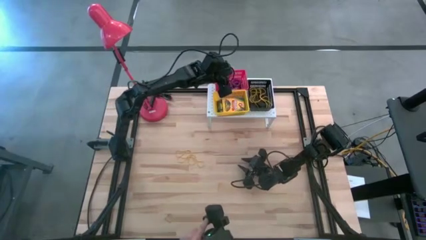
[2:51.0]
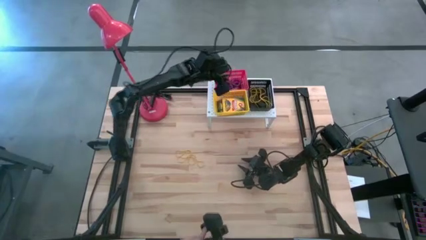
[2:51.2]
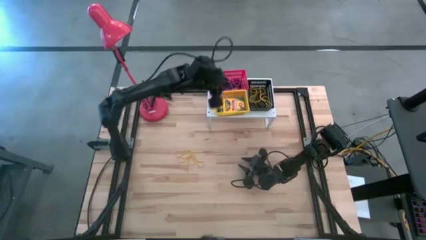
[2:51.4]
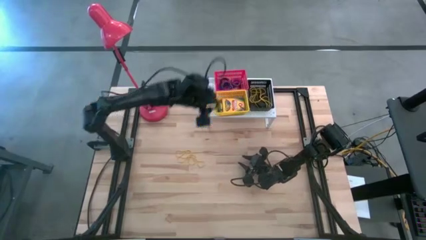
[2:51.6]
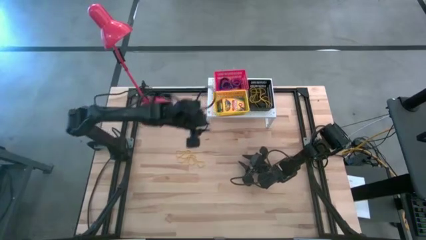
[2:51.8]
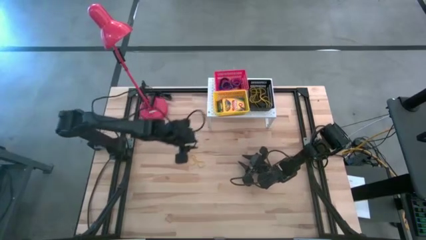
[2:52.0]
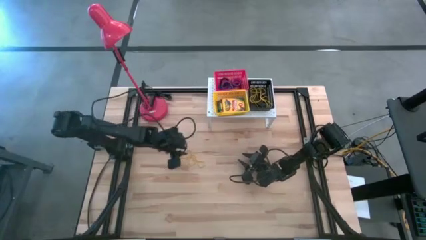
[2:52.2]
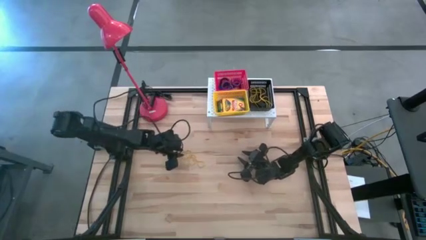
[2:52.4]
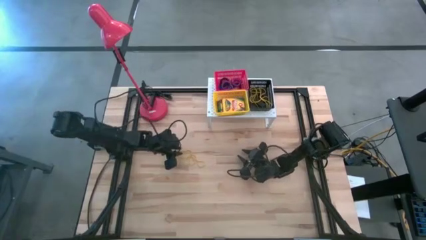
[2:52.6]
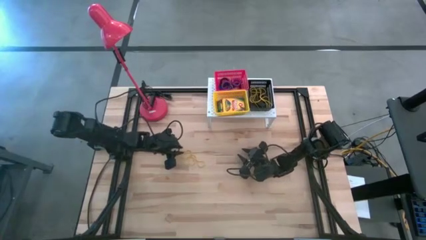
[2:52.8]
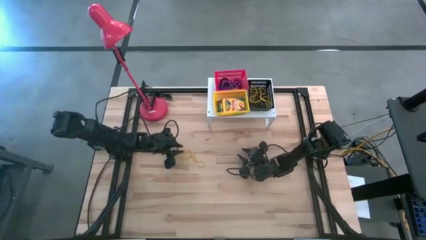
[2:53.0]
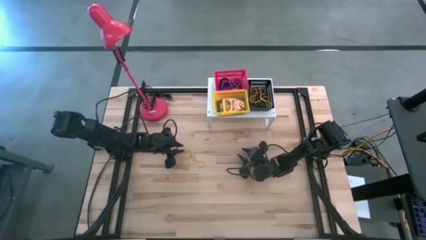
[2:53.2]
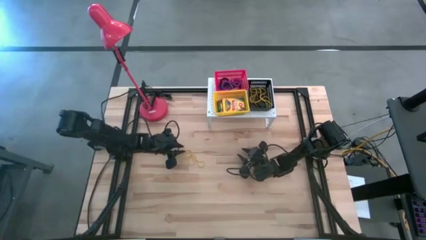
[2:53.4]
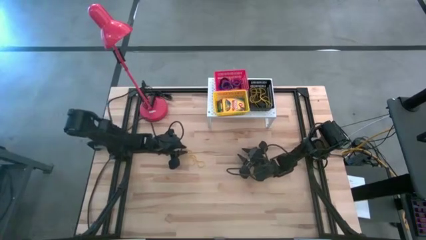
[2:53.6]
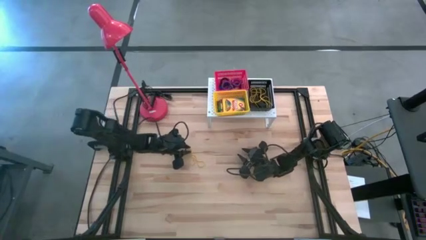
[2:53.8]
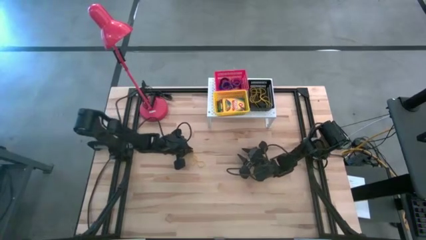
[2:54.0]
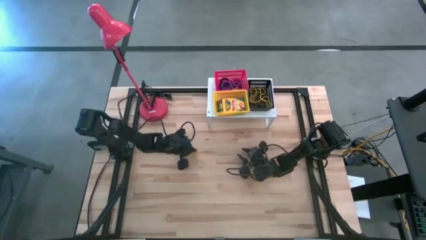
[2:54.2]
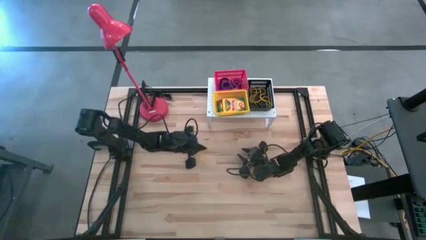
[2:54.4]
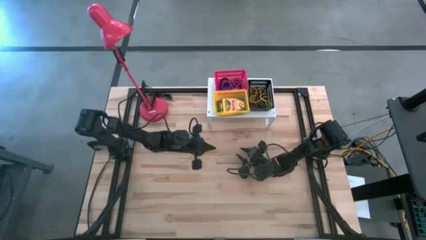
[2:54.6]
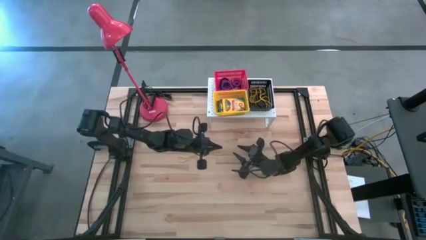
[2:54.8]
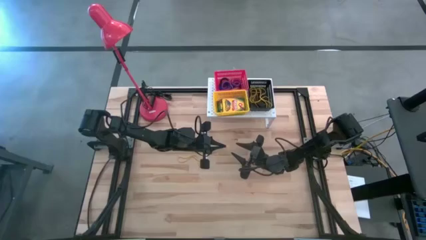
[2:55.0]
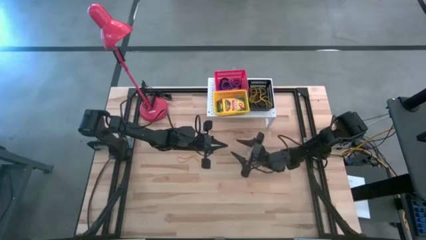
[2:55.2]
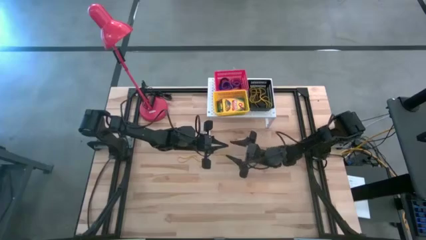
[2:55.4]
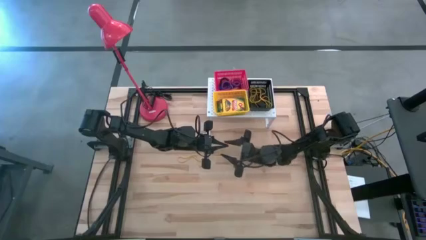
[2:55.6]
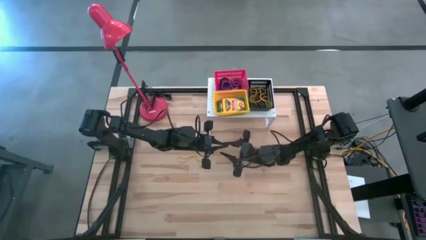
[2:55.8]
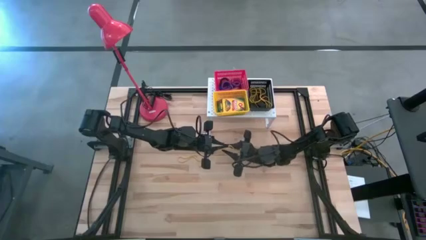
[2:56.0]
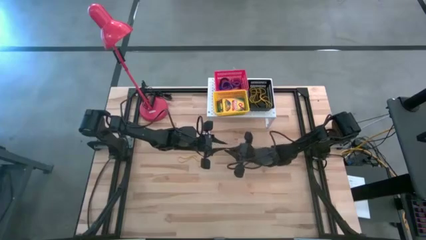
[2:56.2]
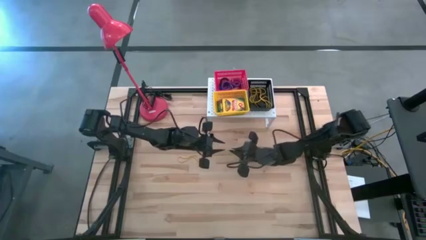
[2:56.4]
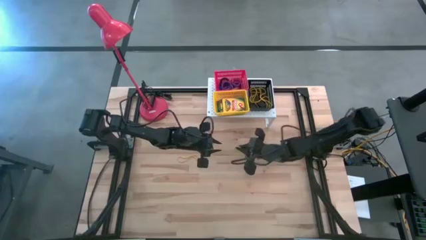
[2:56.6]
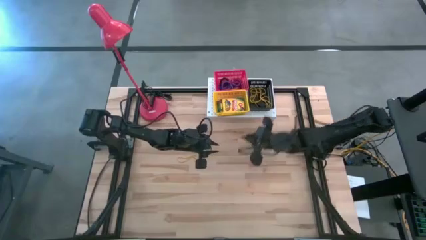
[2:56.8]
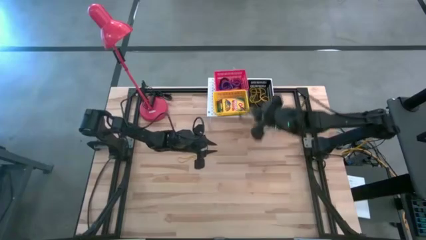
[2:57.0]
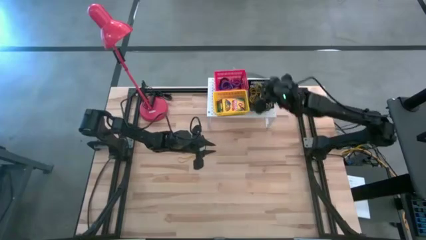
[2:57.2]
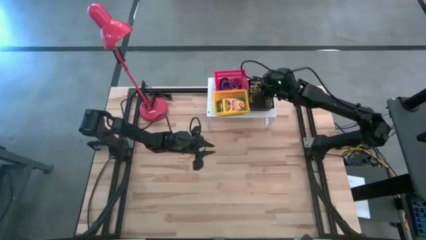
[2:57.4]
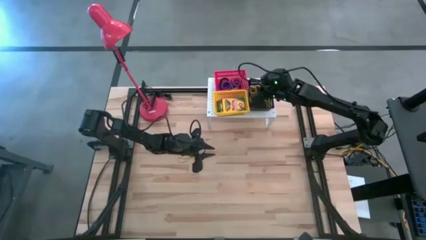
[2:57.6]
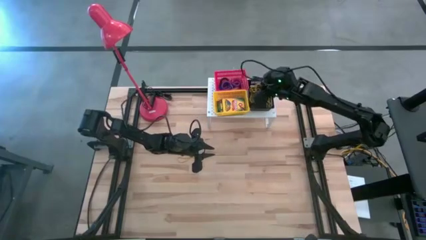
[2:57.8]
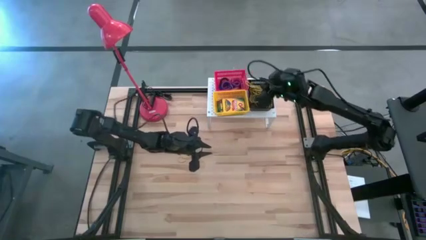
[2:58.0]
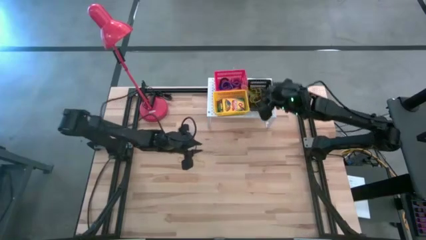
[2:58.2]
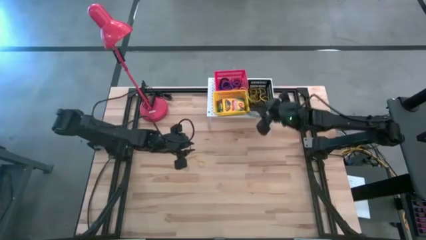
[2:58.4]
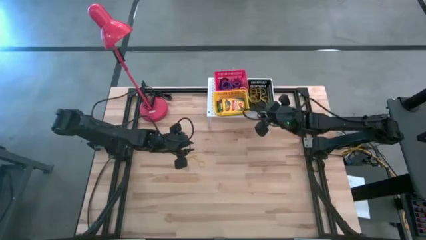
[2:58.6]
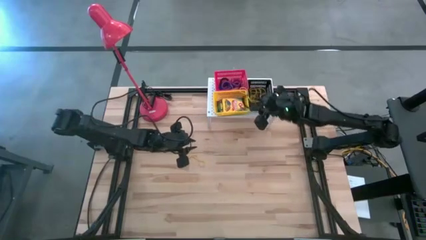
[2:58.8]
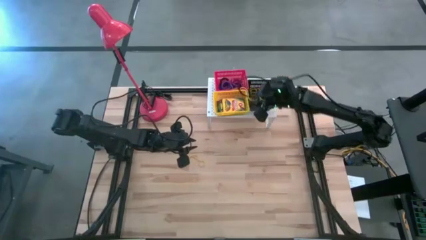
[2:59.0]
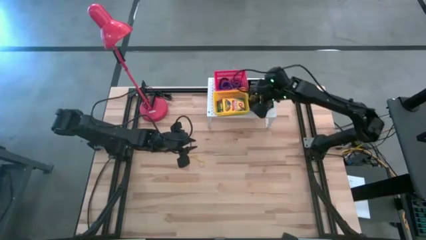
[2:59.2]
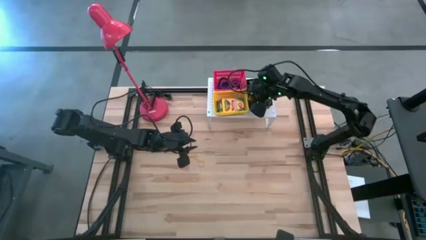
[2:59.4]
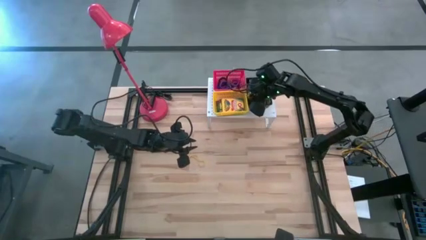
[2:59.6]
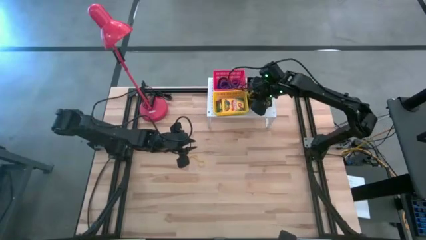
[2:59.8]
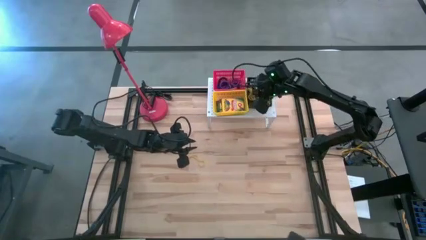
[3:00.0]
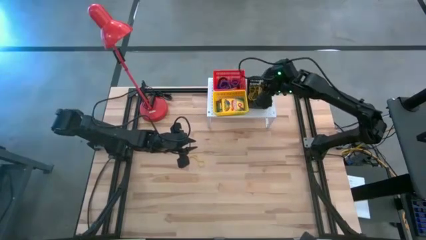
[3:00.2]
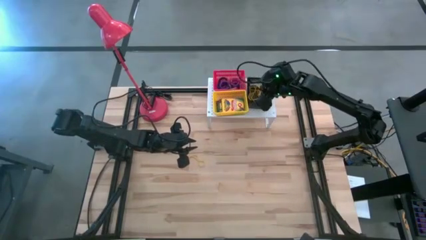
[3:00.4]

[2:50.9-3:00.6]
Task: Pick & Place Office Desk Supplies
Put the yellow rubber band into the black bin on the shelf

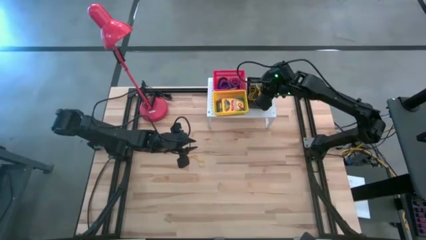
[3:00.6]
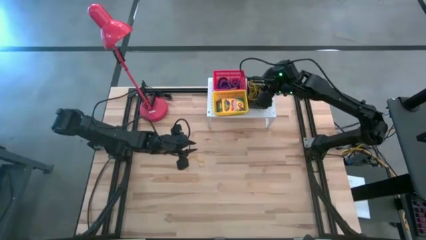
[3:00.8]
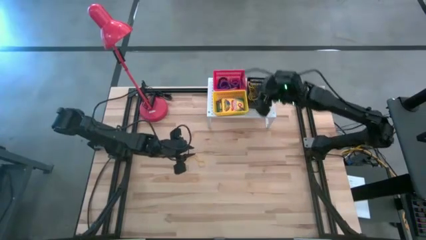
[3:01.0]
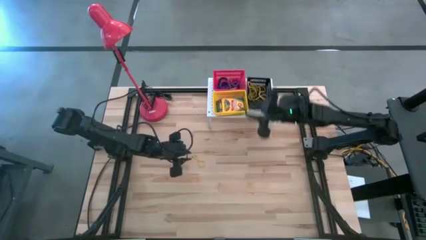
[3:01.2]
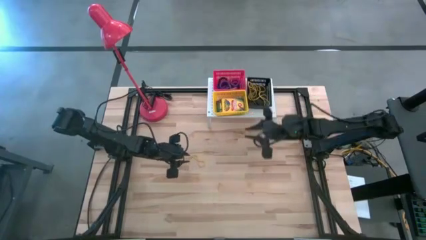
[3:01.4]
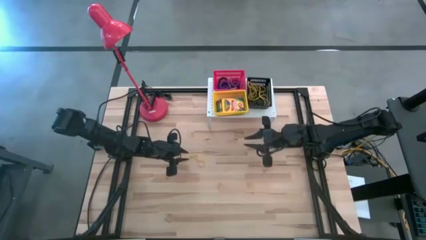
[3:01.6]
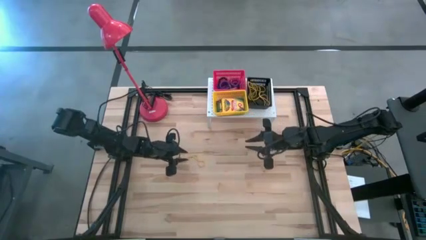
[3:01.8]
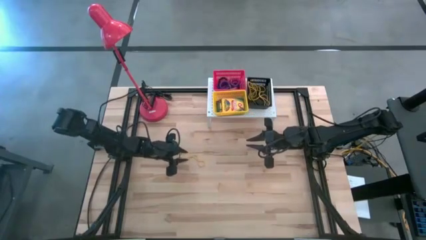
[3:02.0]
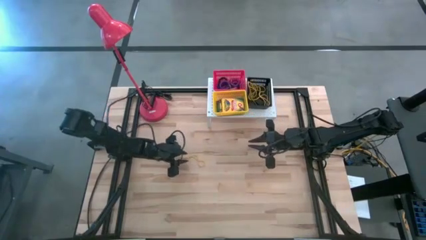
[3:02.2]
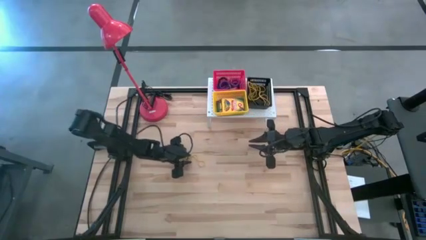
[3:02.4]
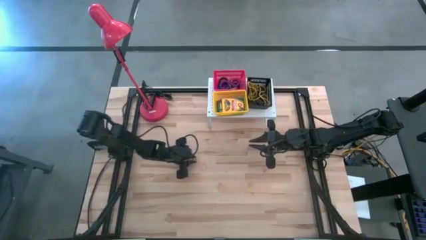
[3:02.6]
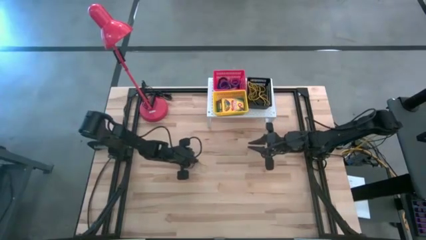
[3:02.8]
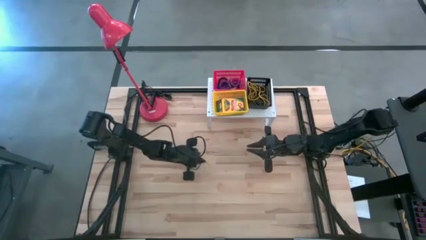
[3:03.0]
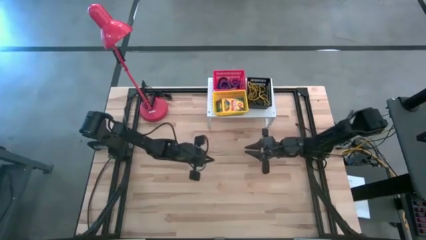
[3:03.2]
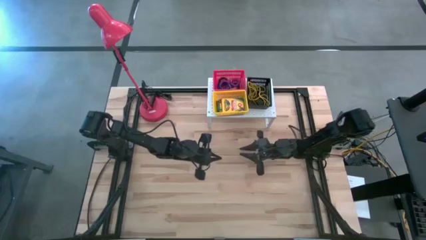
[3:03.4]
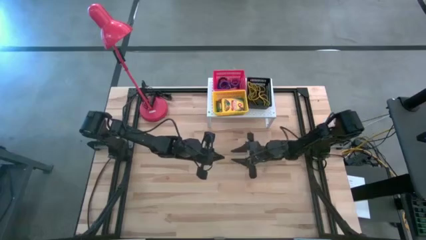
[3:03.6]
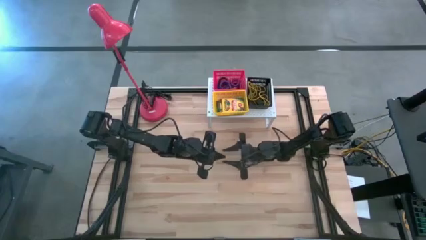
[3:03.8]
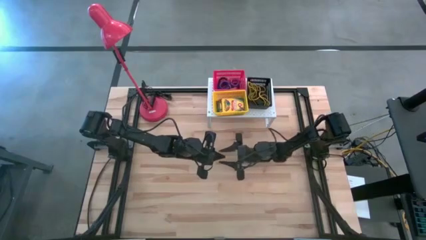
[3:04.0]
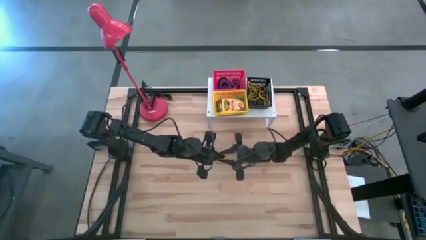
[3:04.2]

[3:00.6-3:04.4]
Put the yellow rubber band into the black bin on the shelf

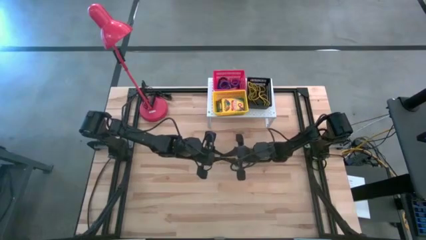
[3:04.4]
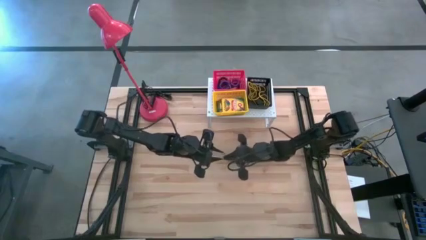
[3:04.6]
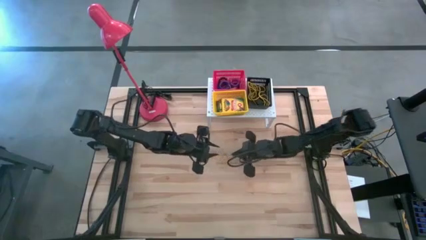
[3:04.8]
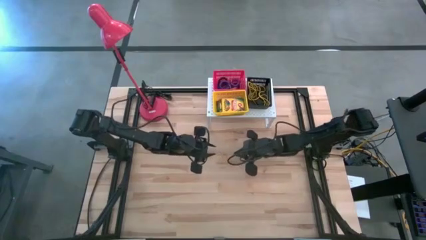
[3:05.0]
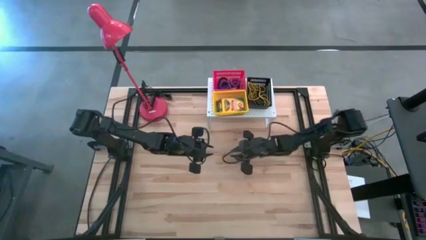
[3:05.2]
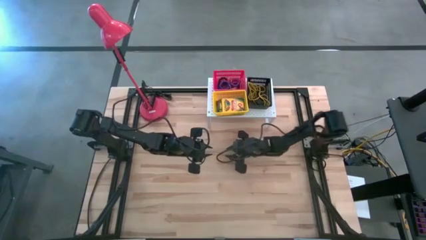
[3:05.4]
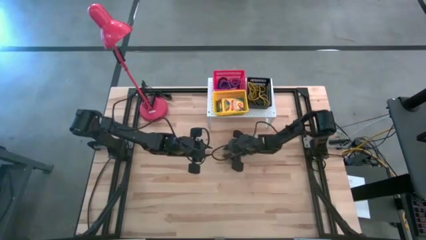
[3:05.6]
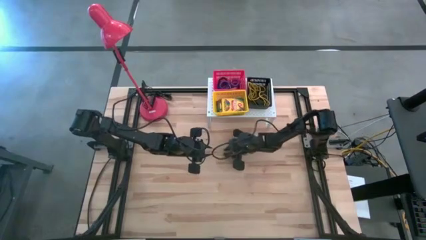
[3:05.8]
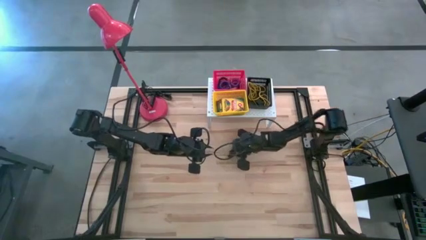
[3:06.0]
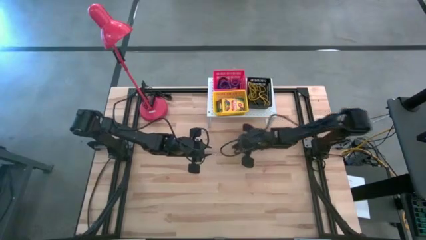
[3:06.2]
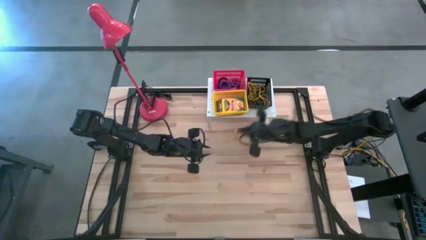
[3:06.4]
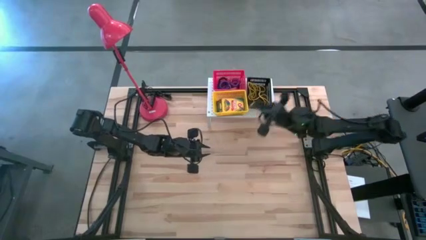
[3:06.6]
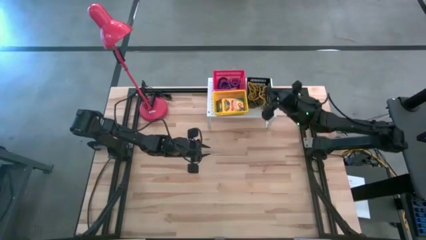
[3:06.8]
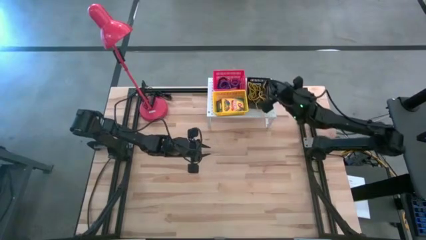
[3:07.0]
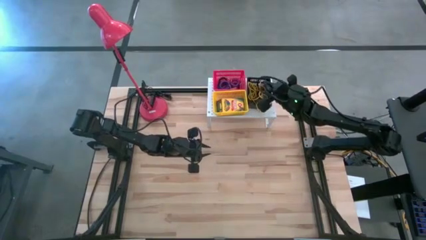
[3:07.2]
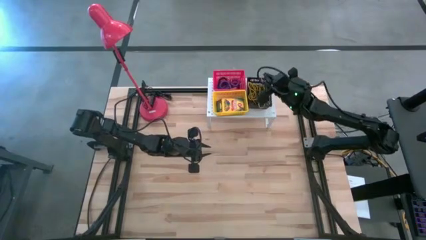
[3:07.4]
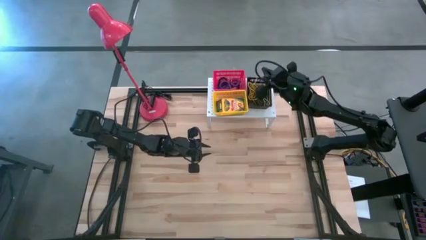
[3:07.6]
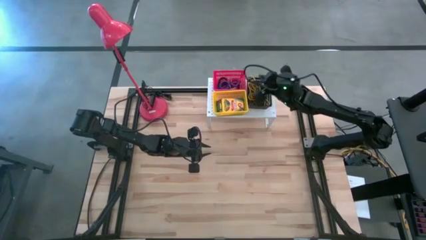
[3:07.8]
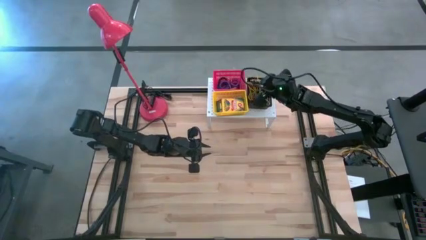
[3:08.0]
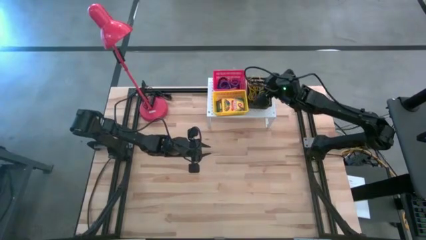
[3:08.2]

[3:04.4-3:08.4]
Put the yellow rubber band into the black bin on the shelf

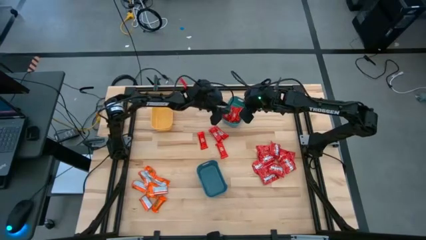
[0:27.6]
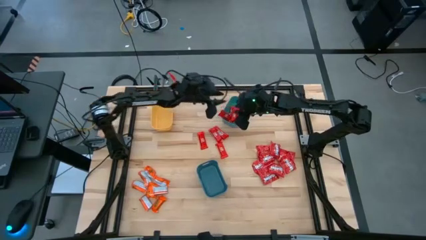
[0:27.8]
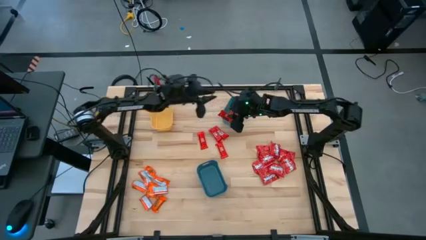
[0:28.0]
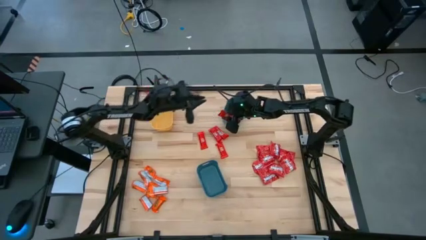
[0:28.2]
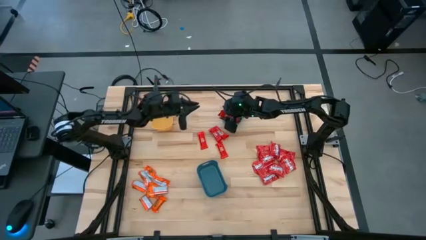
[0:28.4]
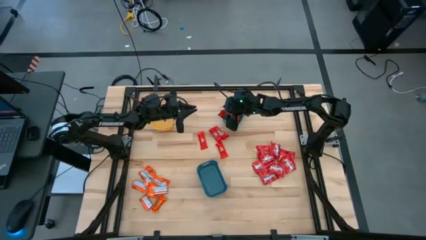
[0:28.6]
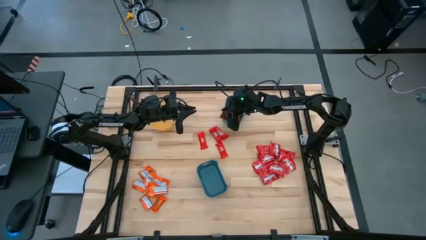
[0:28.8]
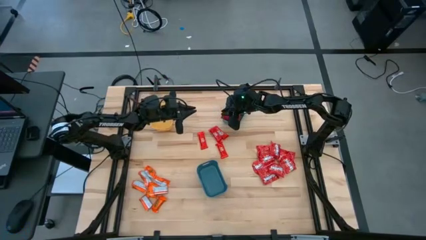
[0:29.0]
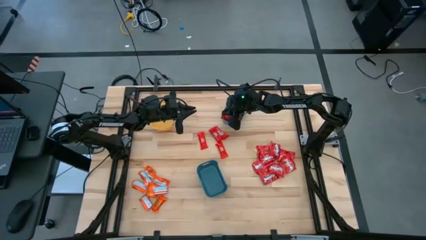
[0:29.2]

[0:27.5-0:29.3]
Task: Sort candy
Put the red chocolate bar into the green bin
